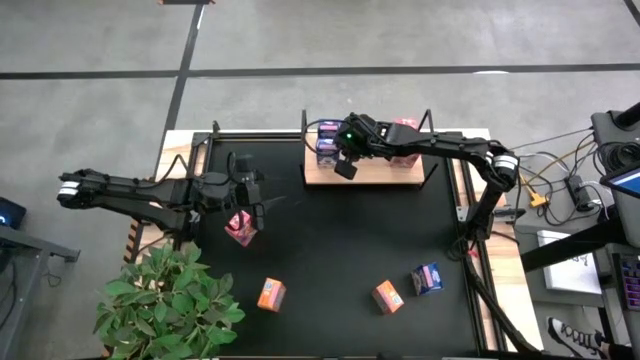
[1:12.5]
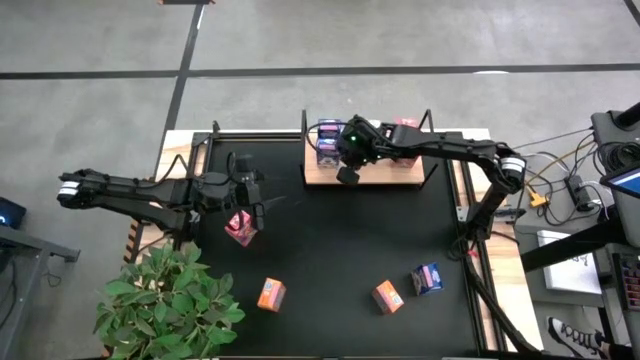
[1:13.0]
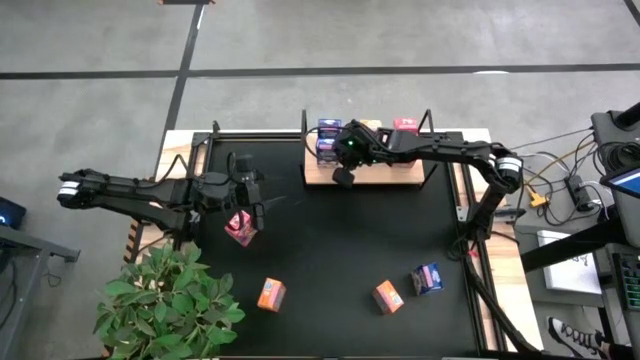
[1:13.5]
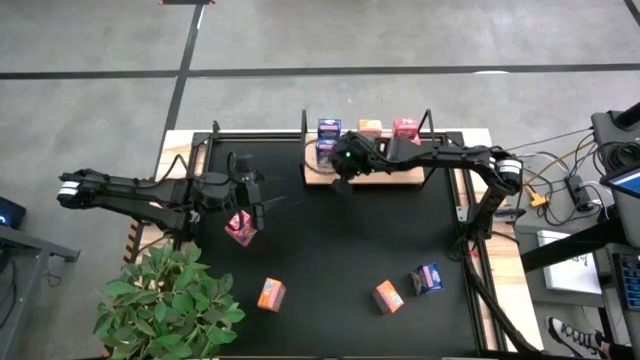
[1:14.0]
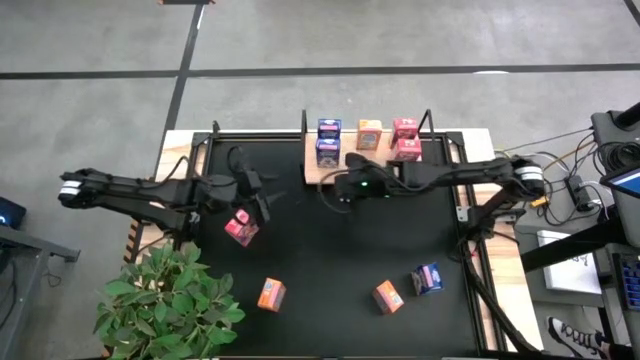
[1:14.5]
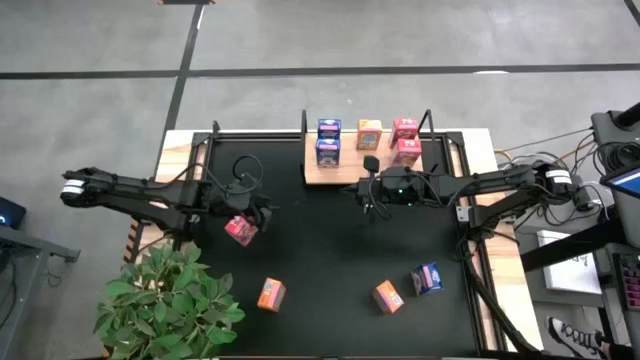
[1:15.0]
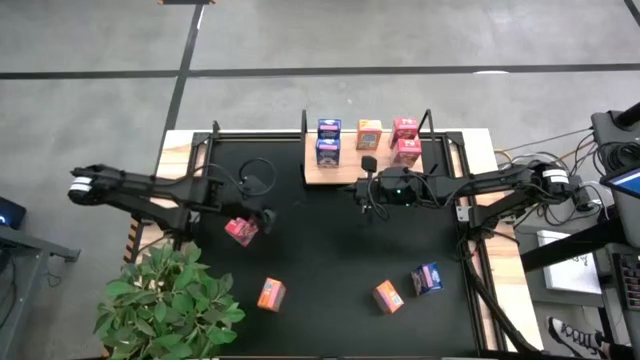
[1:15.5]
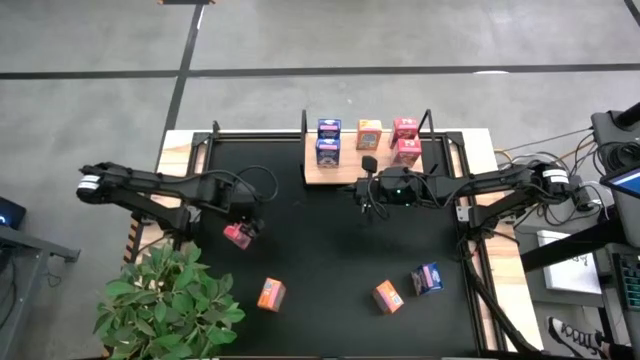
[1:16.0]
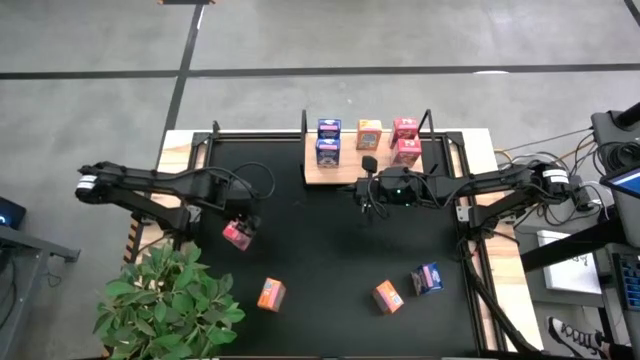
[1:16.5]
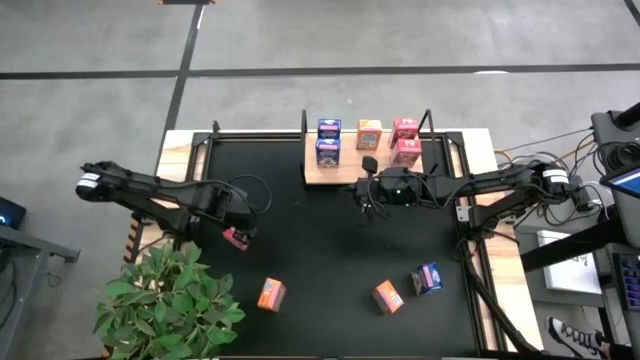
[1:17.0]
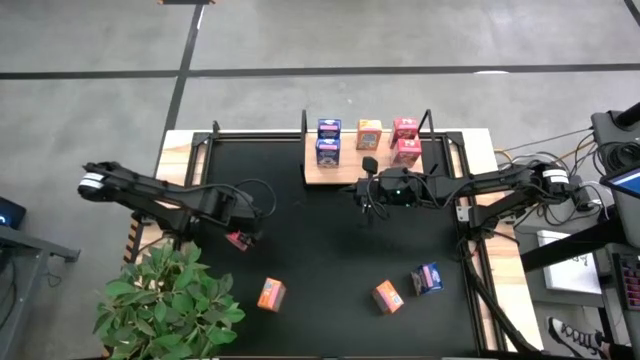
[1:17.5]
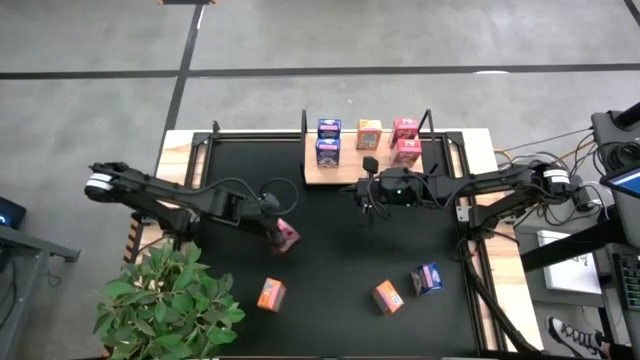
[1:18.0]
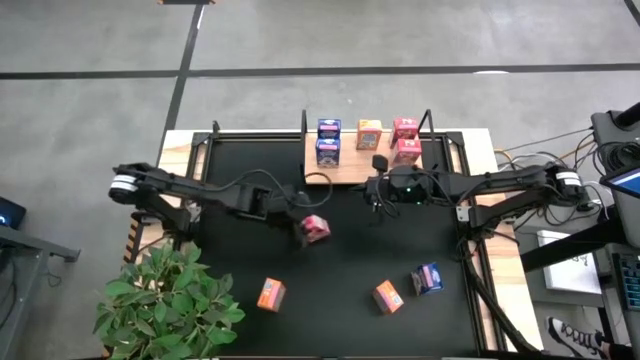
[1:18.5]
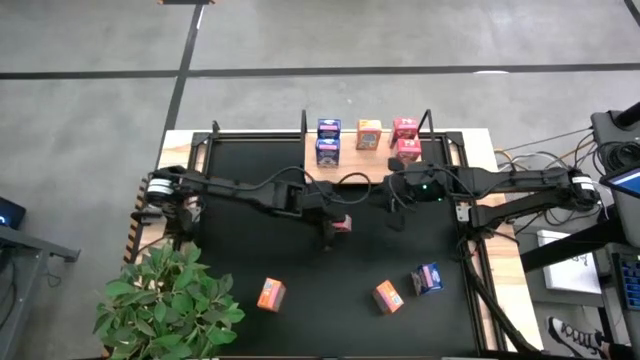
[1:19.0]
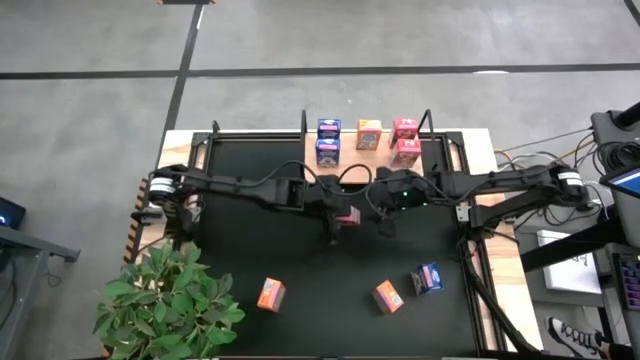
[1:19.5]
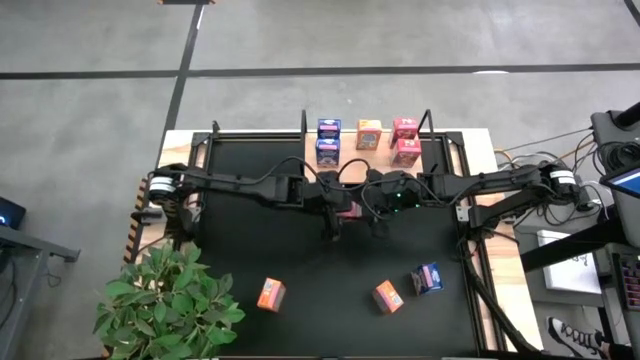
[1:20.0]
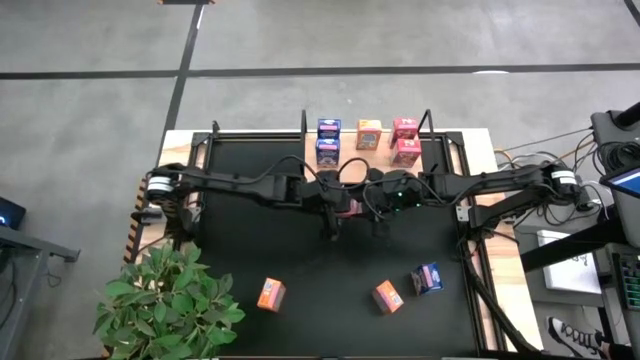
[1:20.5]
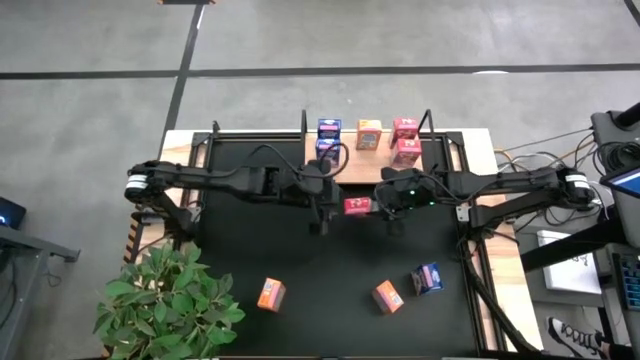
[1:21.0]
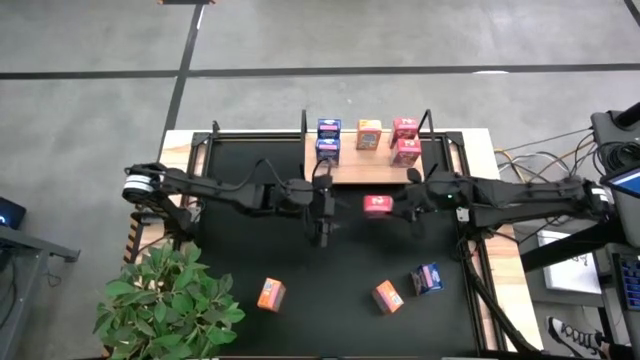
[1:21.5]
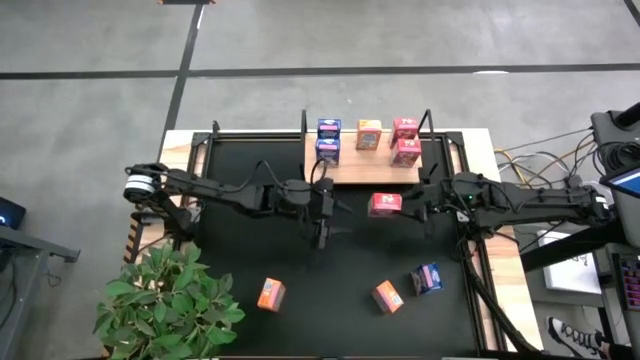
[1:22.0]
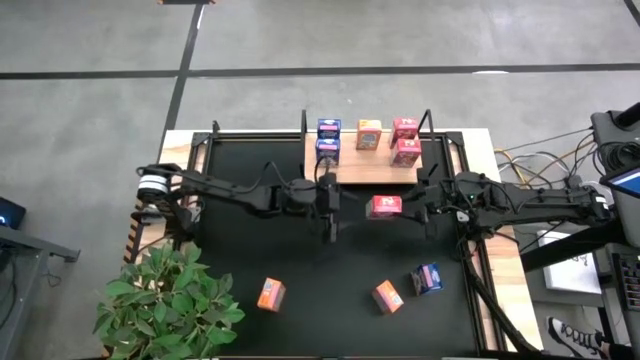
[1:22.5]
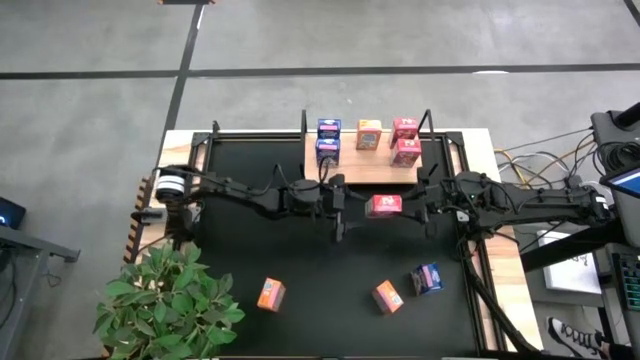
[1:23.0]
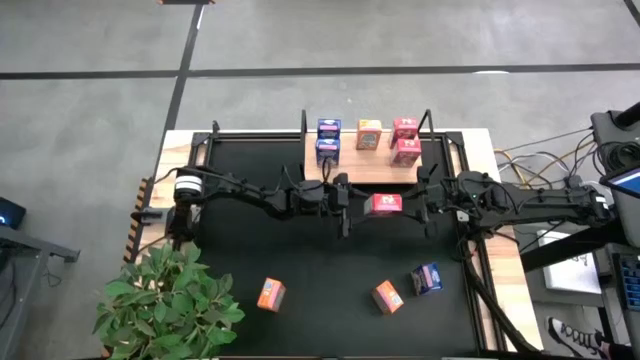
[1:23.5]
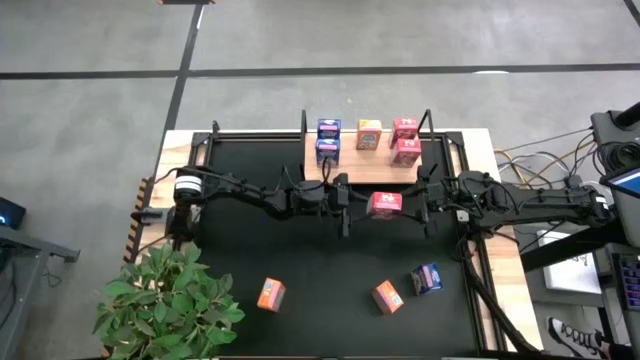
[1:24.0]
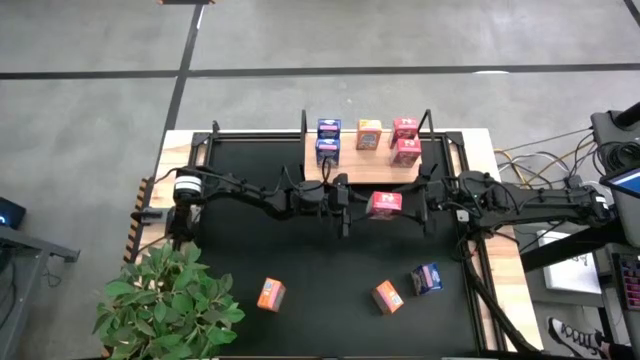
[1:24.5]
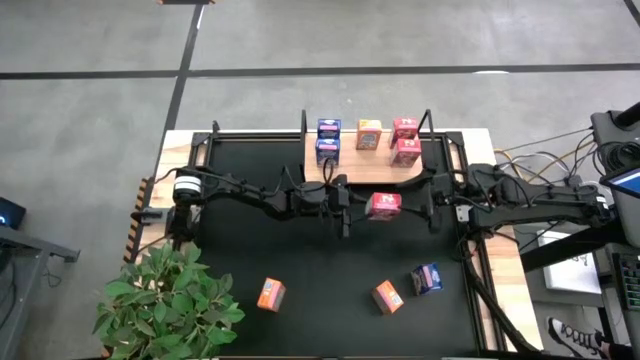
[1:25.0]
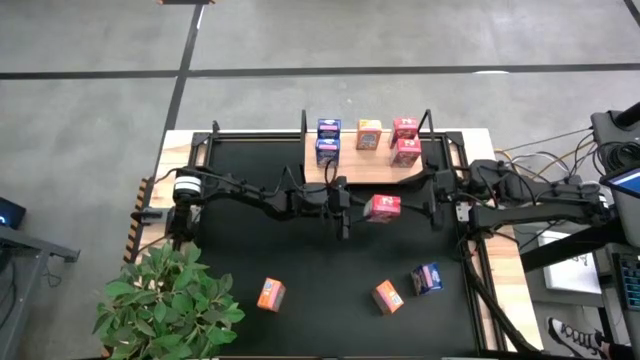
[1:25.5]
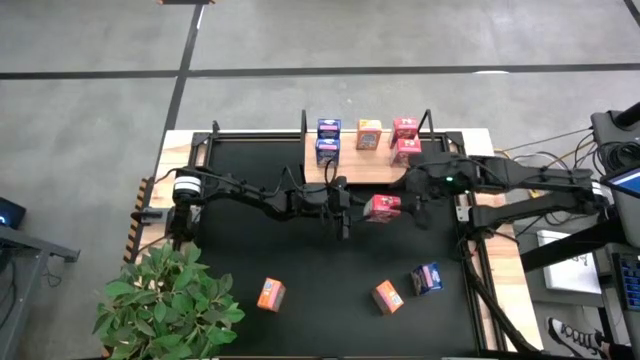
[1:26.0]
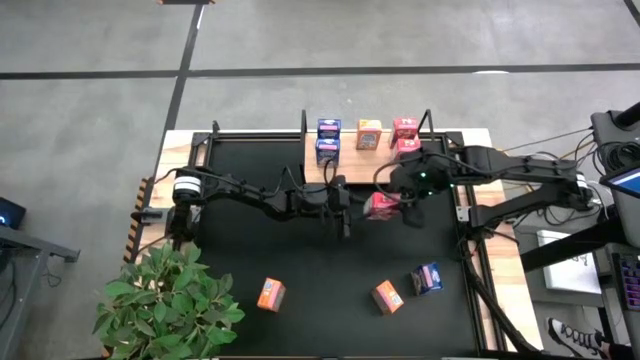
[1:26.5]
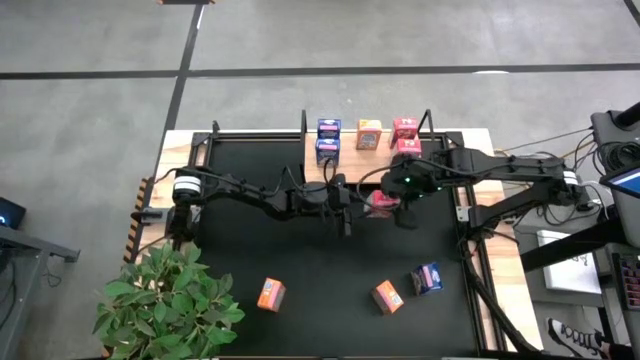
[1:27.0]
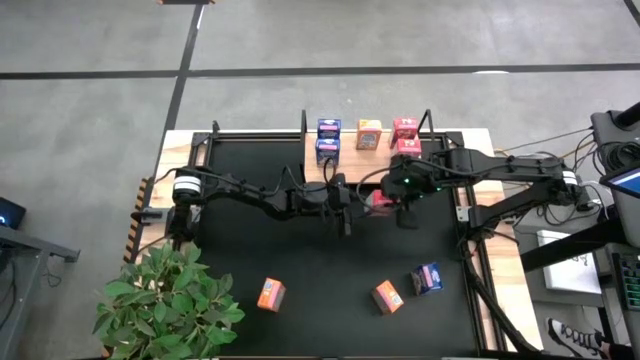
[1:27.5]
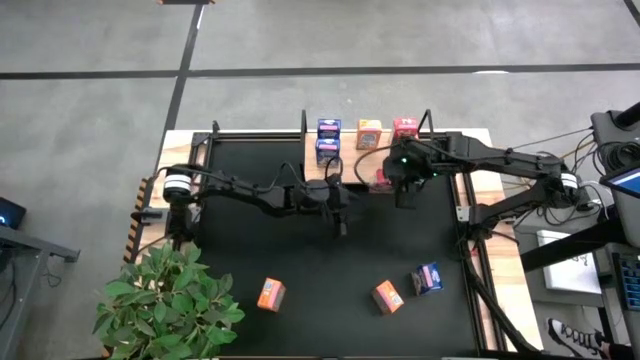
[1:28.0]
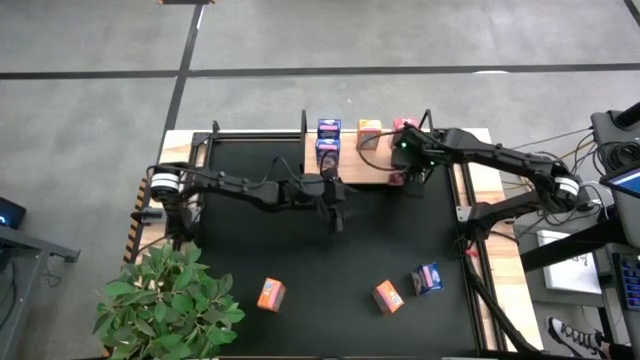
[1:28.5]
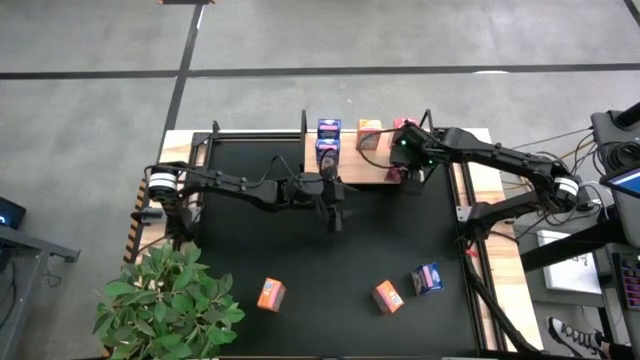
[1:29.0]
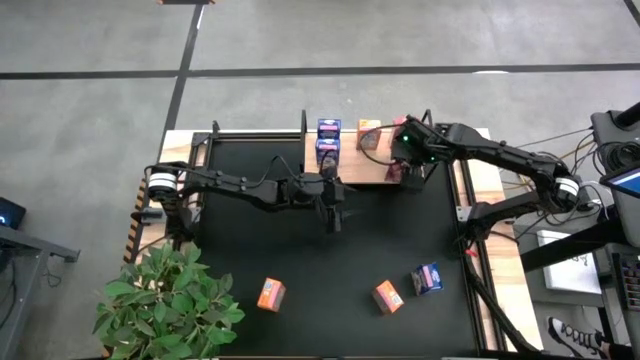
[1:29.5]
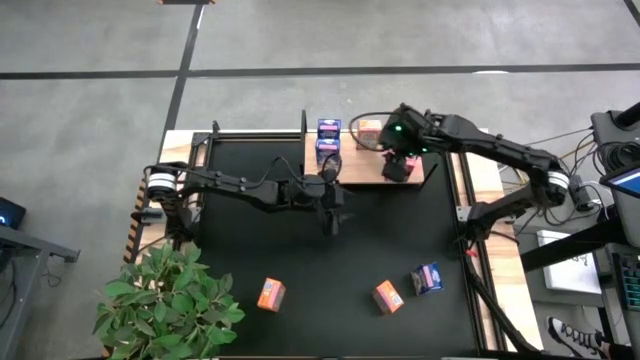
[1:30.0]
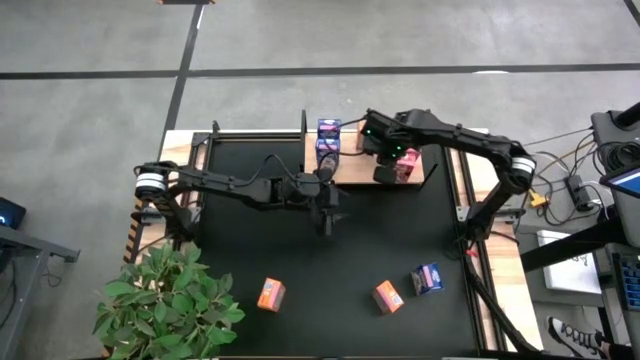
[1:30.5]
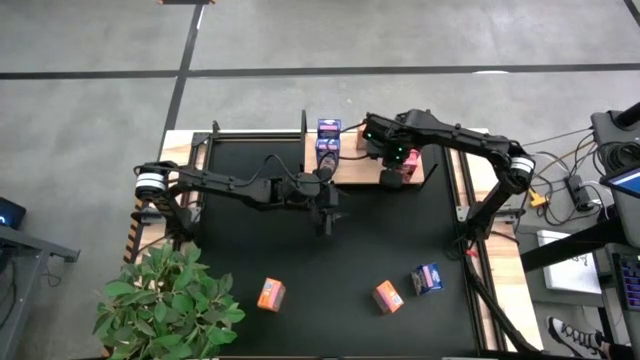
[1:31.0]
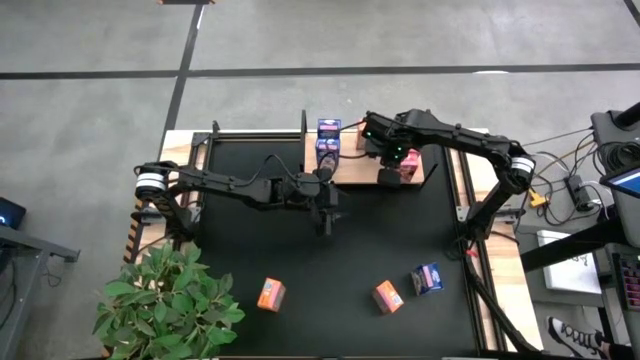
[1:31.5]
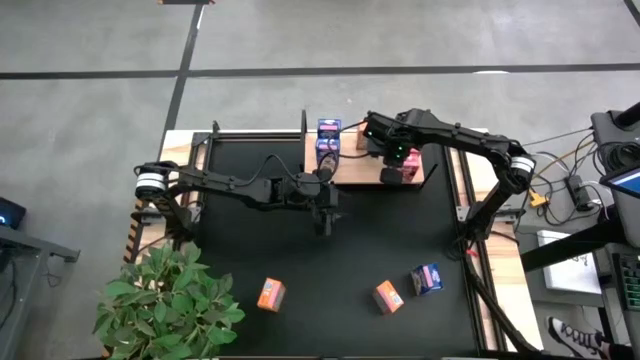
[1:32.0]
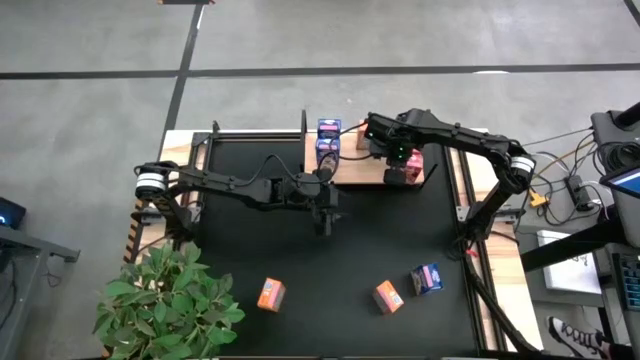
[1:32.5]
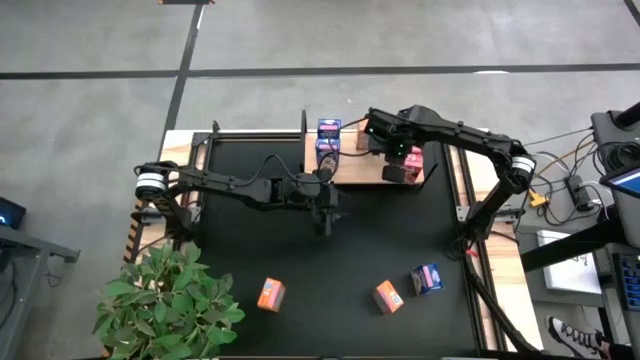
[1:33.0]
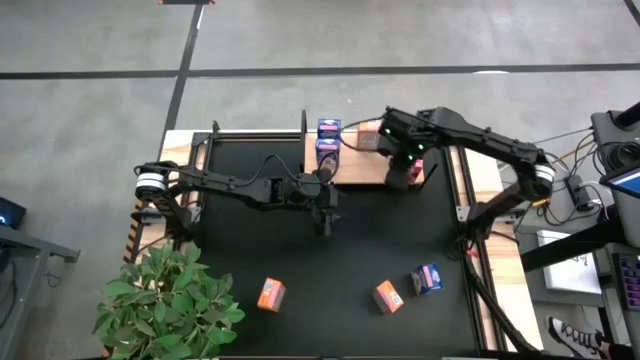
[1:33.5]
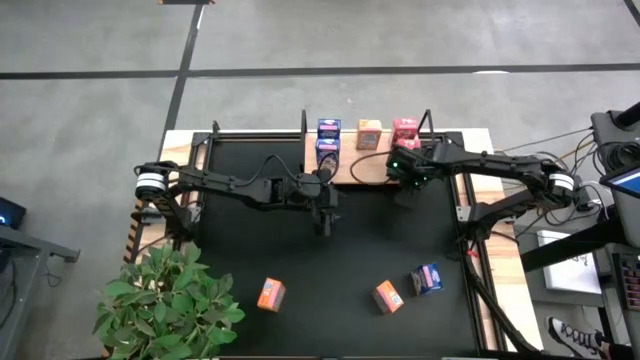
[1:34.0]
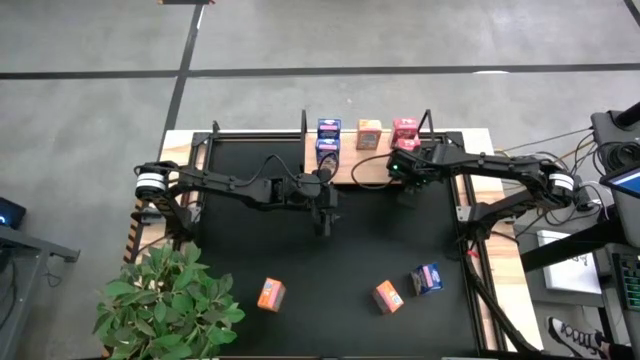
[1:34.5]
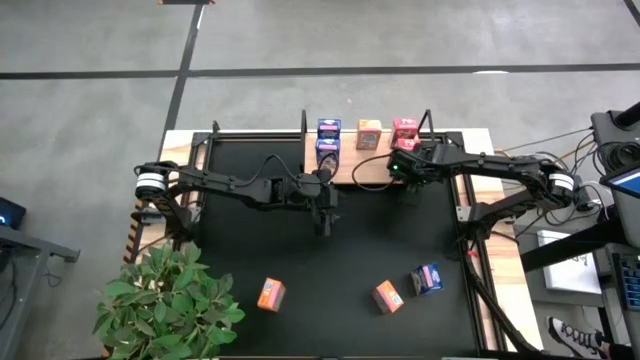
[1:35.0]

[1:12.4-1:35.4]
Task: Stack cereal on shelf
Put the red cereal box on the shelf aligned with the other red cereal box
